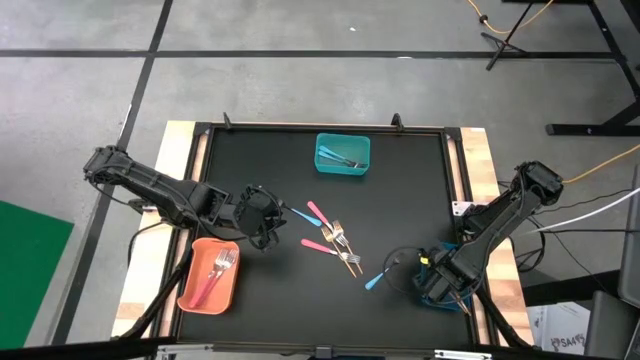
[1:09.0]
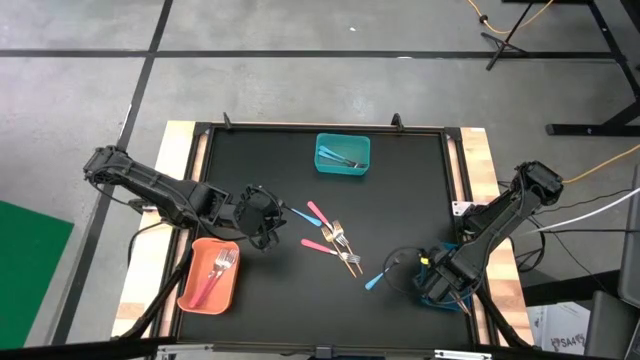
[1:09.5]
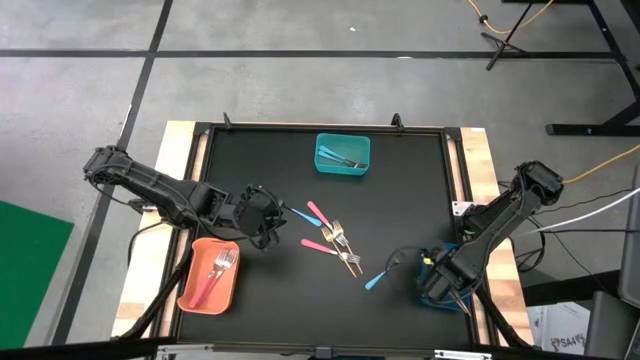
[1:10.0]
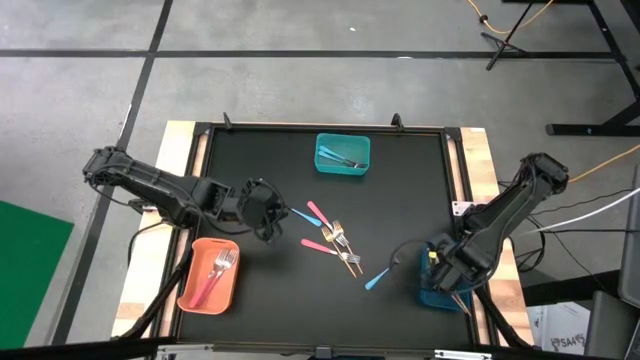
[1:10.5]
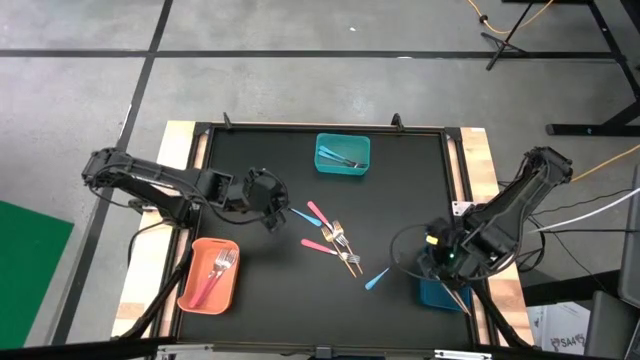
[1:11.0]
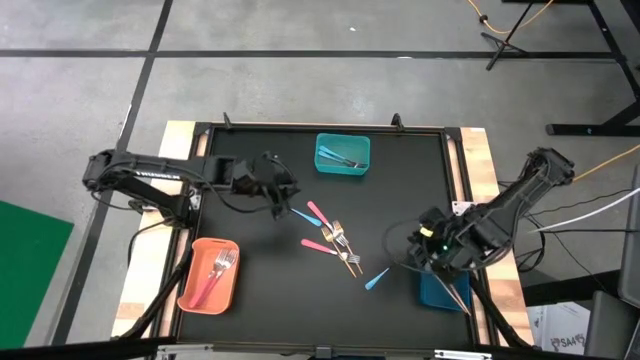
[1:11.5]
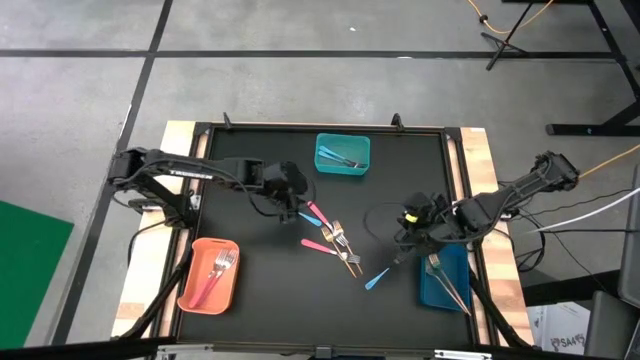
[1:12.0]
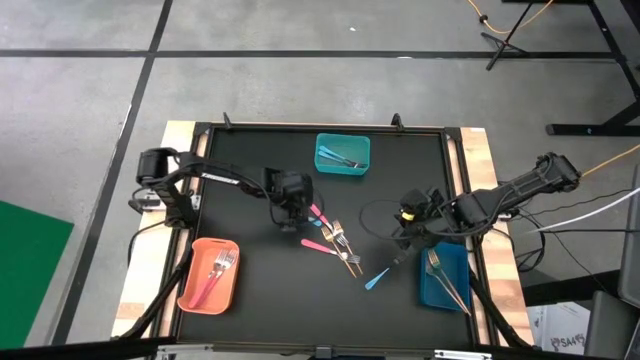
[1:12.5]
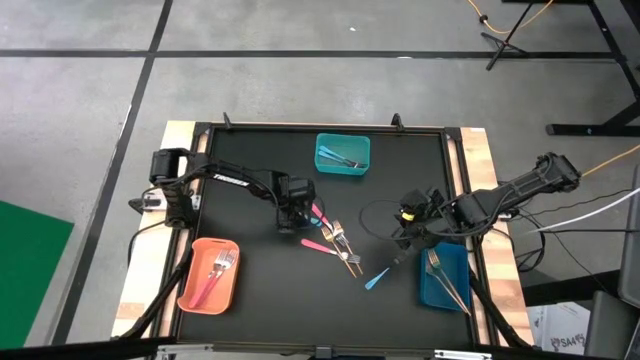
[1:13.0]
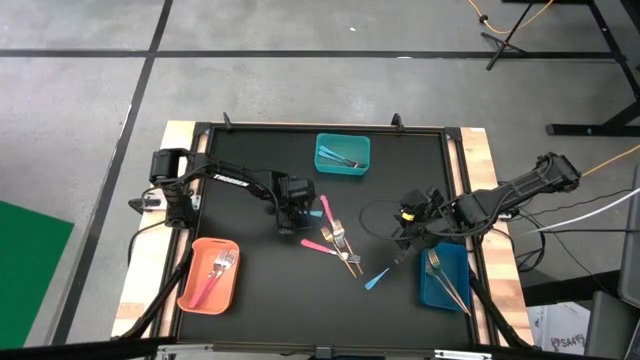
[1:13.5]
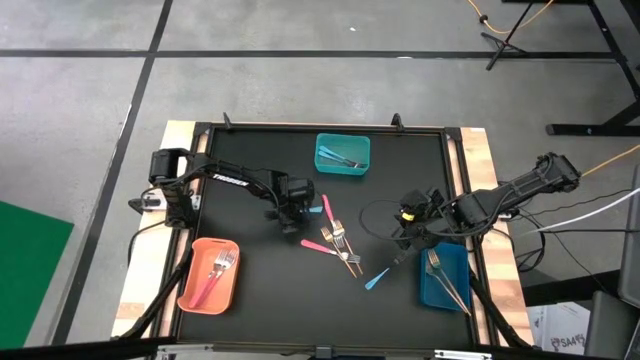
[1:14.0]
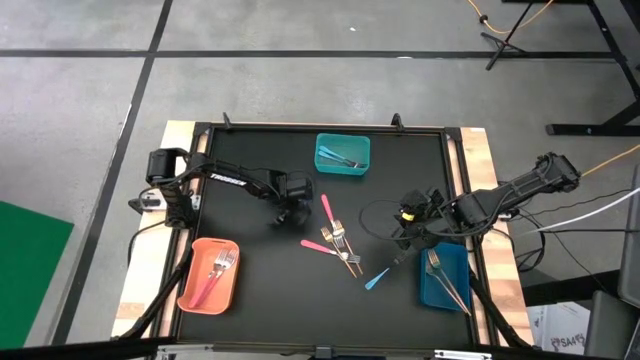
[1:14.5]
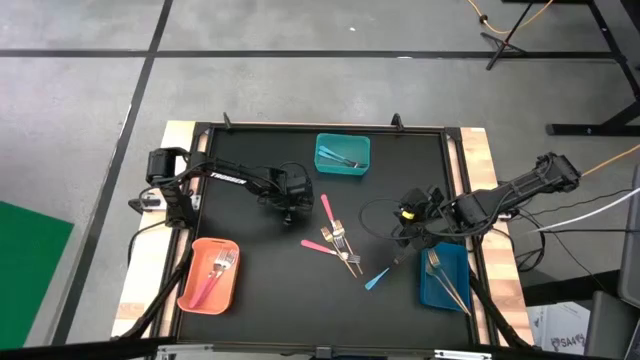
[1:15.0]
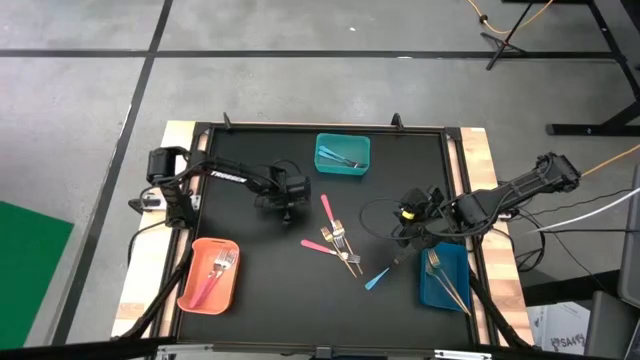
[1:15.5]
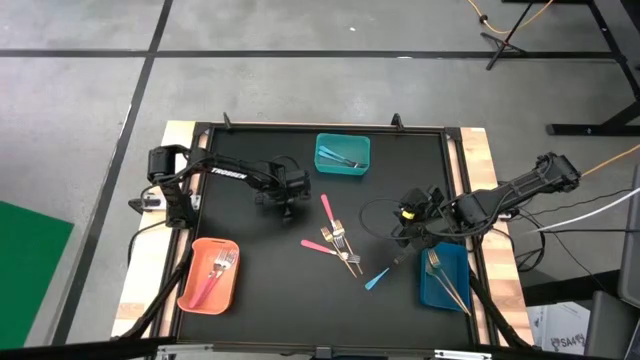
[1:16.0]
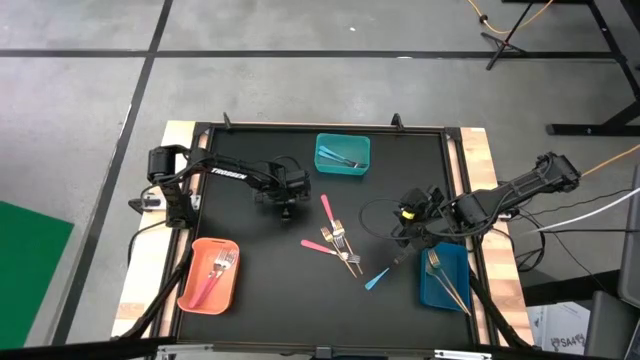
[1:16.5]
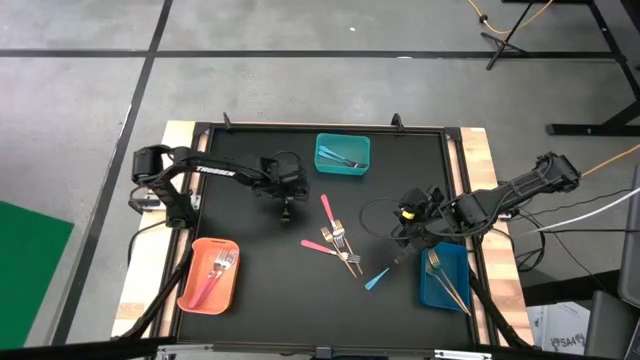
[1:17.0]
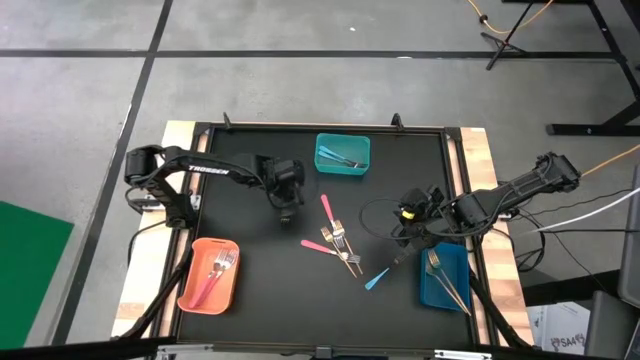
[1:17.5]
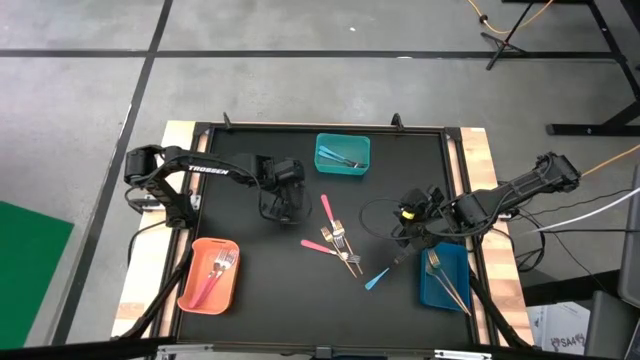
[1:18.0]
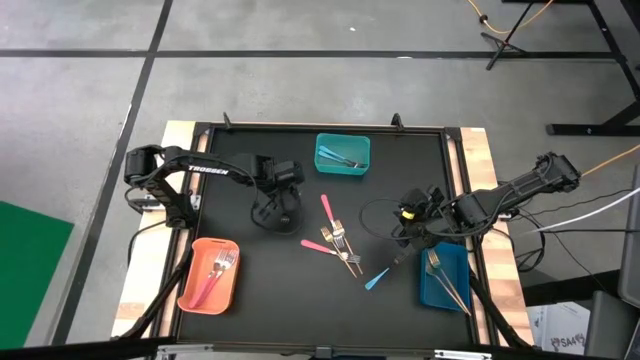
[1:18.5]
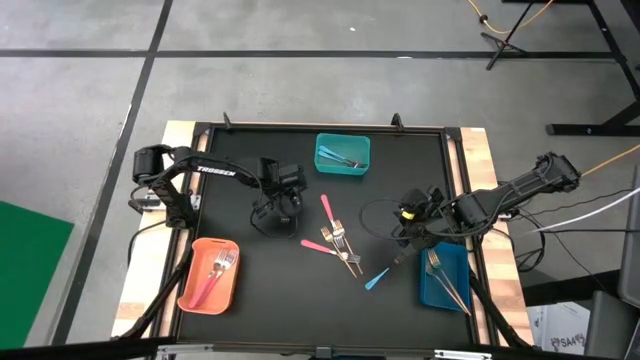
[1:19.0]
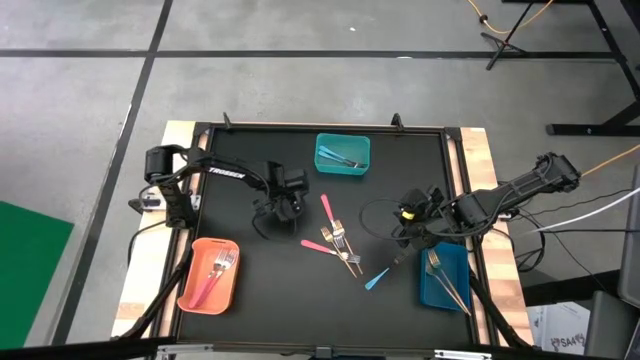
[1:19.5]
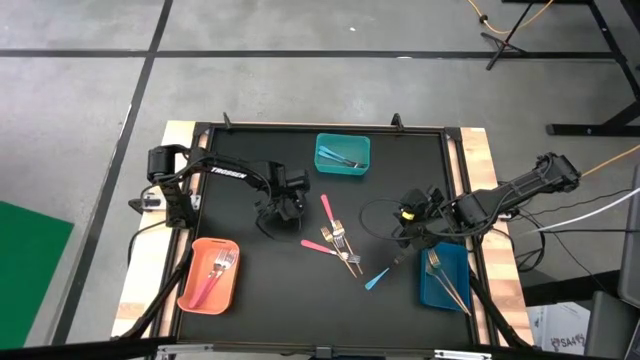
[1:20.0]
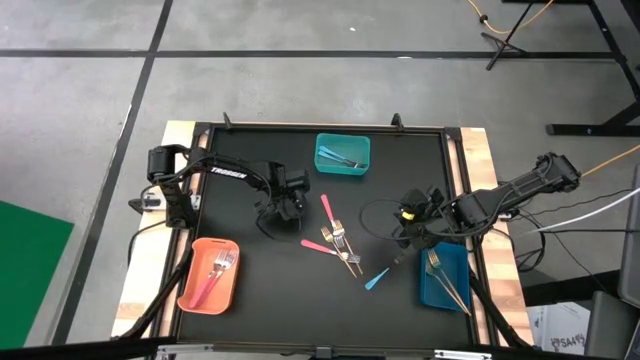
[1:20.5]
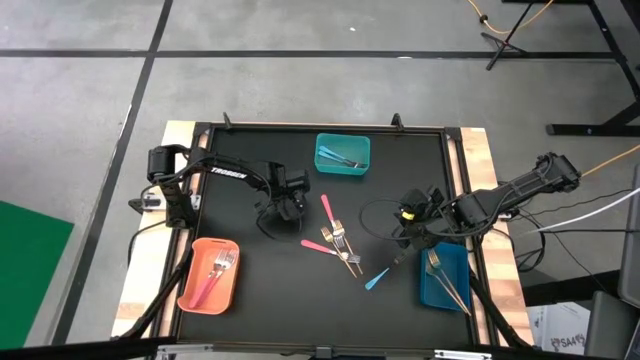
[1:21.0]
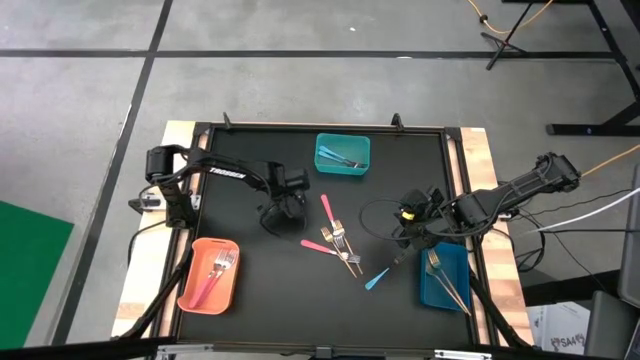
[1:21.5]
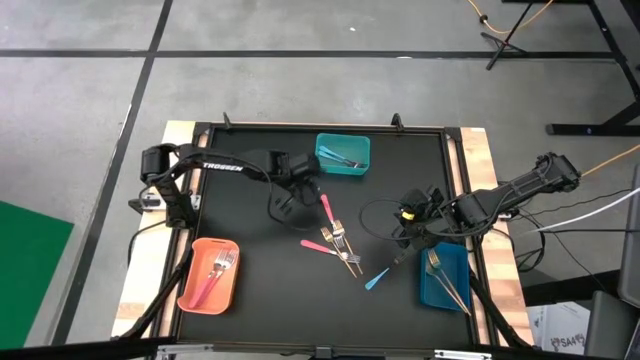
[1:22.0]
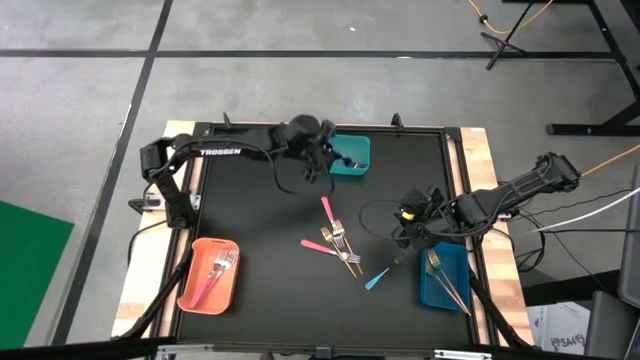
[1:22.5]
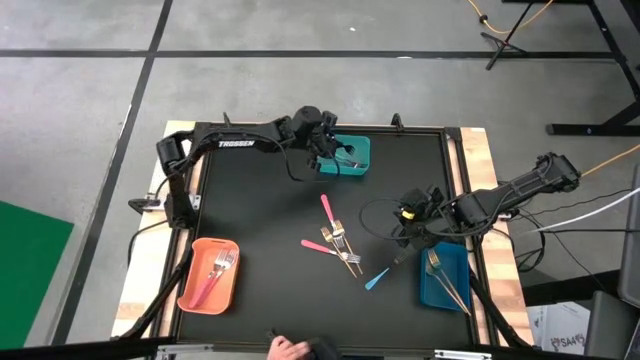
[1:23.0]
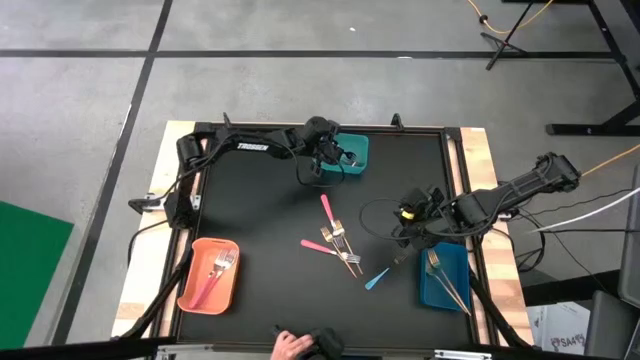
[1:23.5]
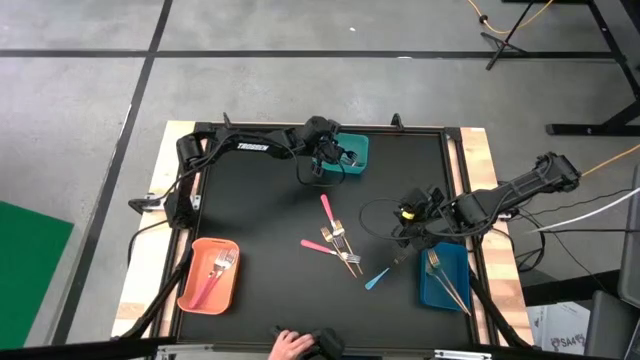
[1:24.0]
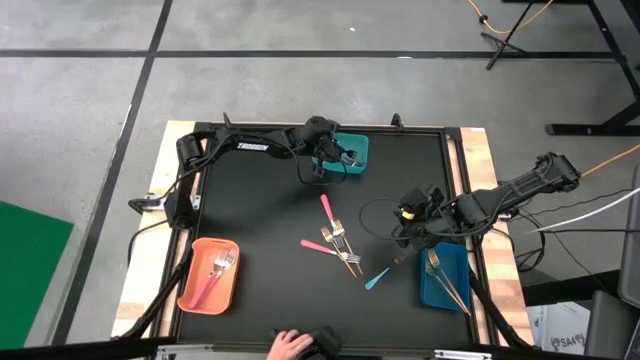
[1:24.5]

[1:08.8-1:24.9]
Task: Sort silverware by color (type)
Put the blue fork into the green bin

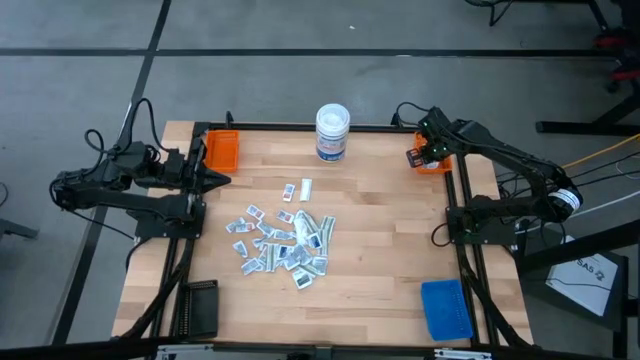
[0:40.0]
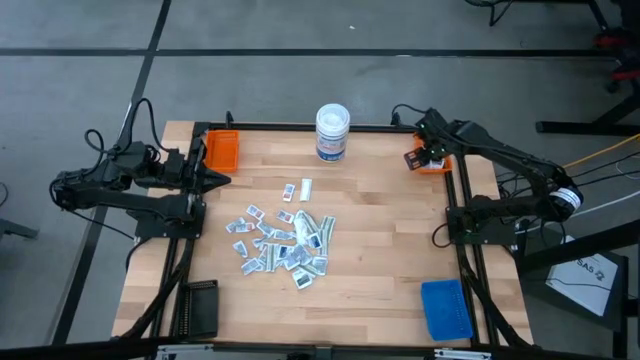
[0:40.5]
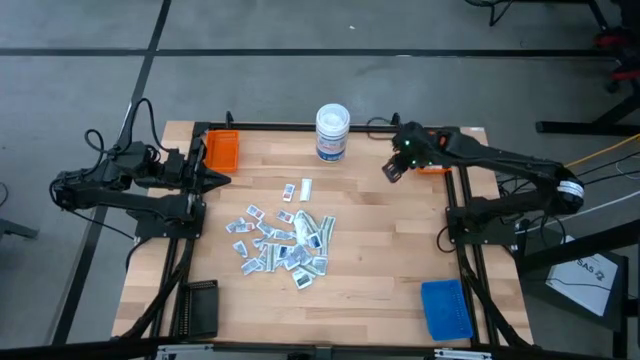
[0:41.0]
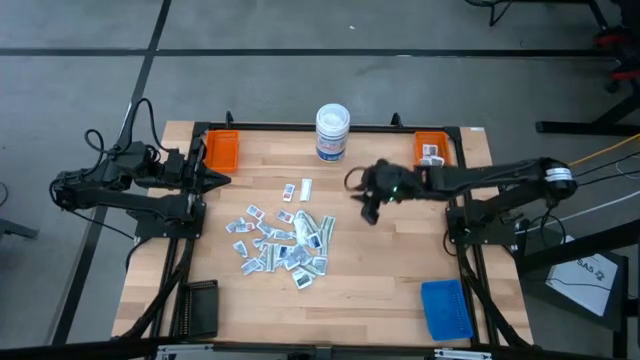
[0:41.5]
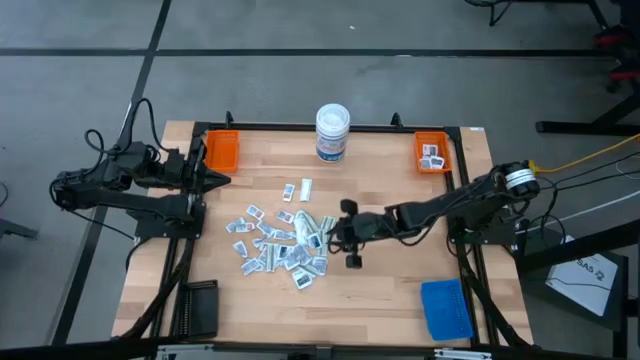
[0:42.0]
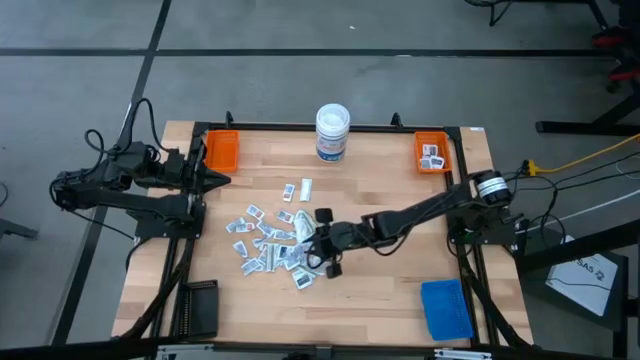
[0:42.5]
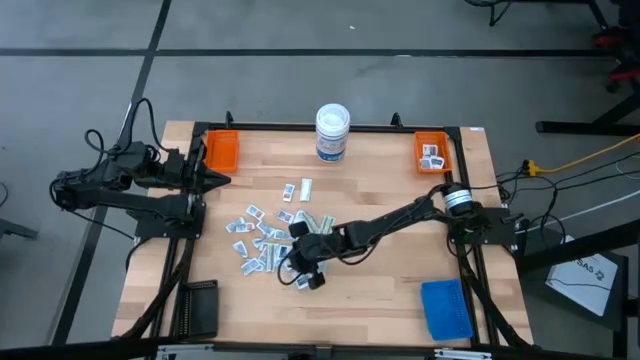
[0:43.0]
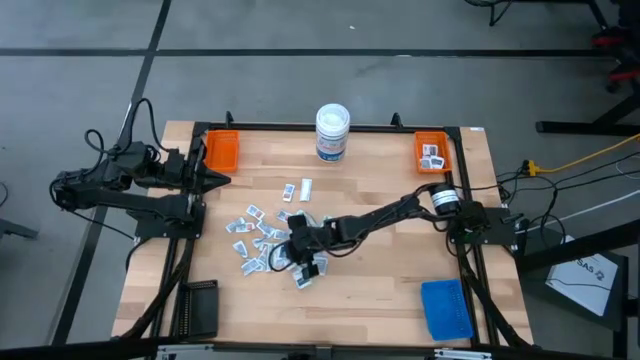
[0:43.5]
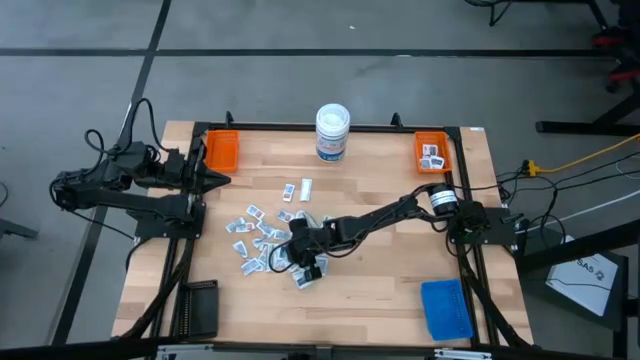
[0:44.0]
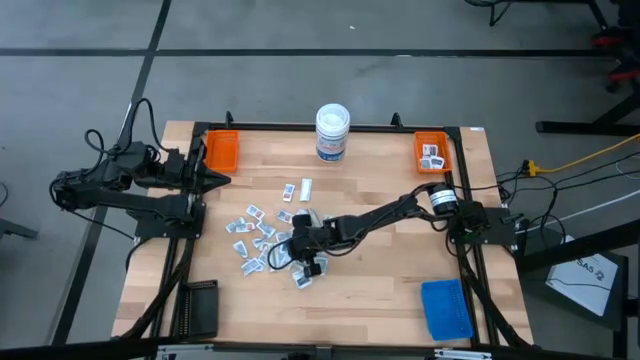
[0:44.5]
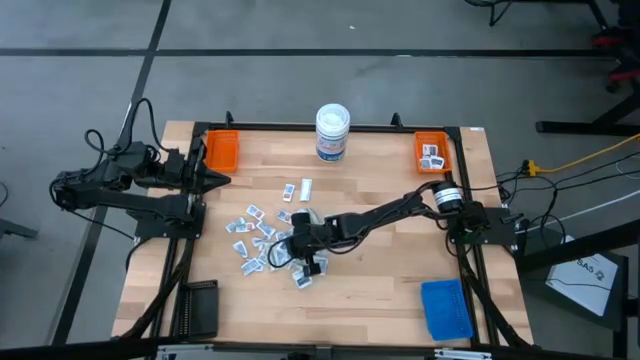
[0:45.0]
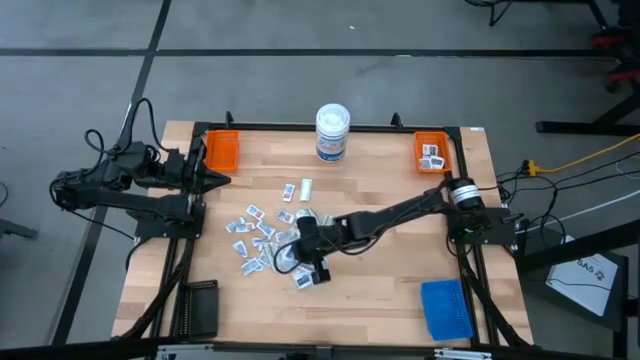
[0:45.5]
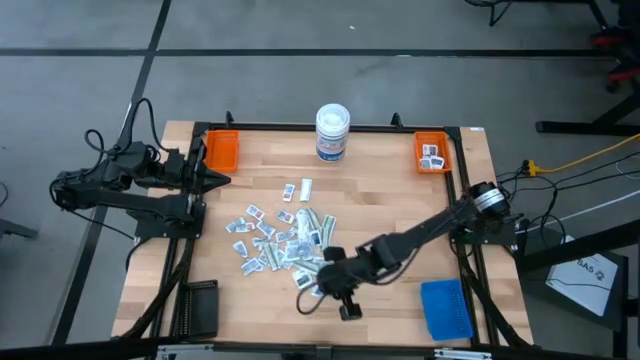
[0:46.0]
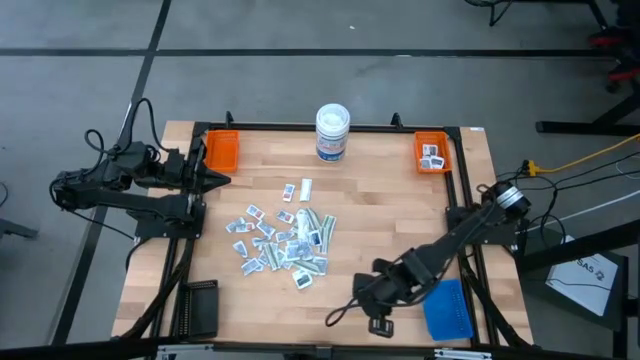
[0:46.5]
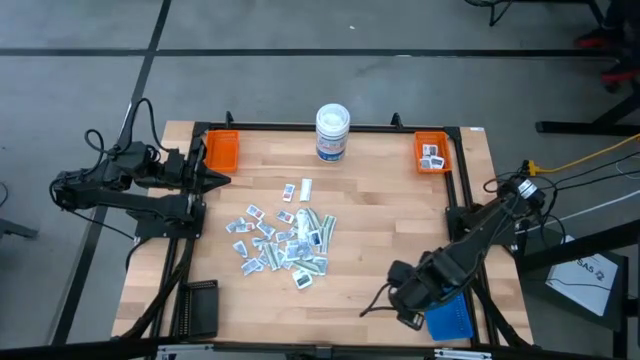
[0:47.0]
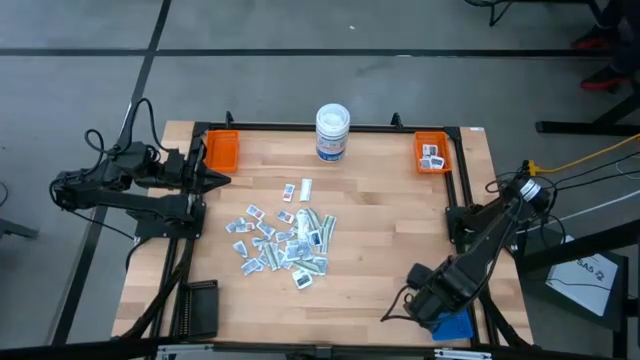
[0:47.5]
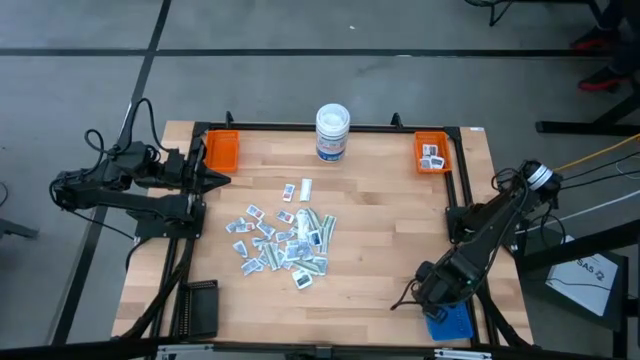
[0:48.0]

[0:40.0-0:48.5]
Task: Pick & Place First Aid Supplies
Put the blue alcohol pad into the blue bin
